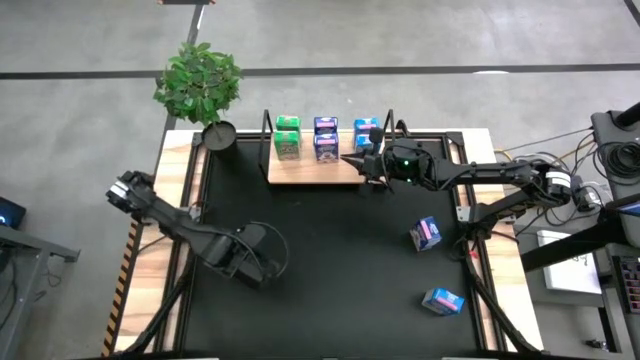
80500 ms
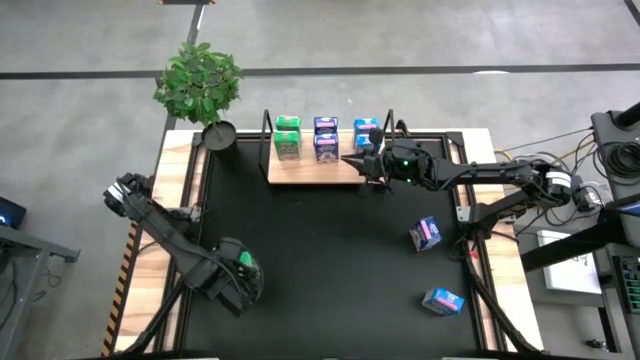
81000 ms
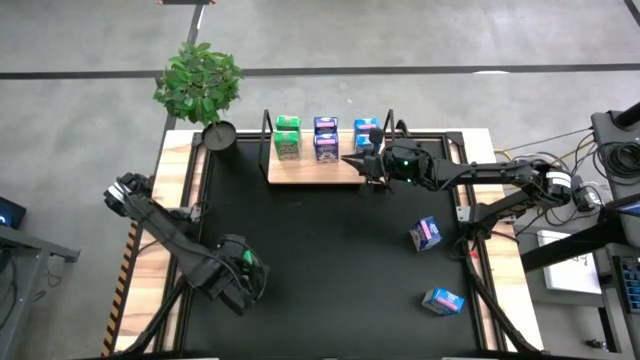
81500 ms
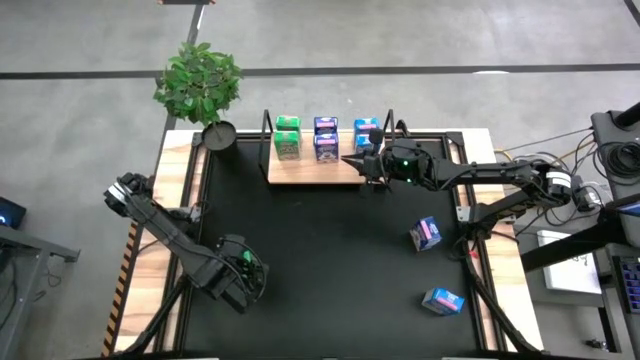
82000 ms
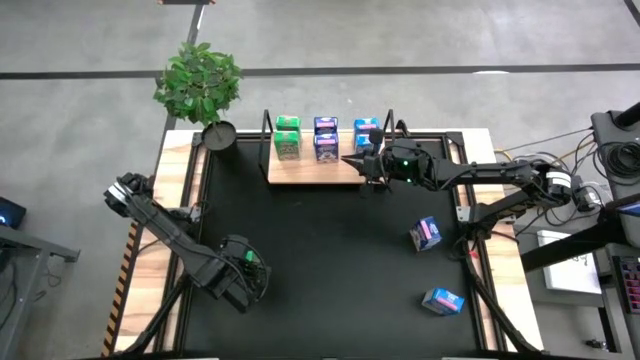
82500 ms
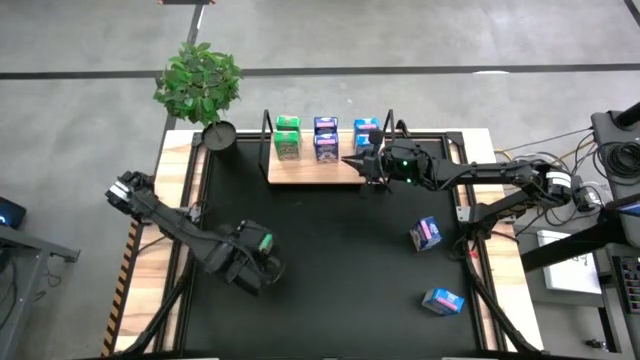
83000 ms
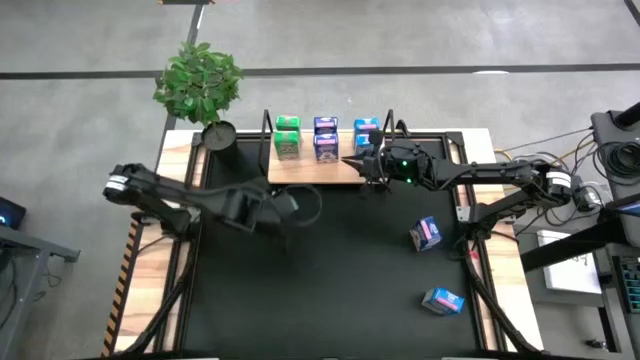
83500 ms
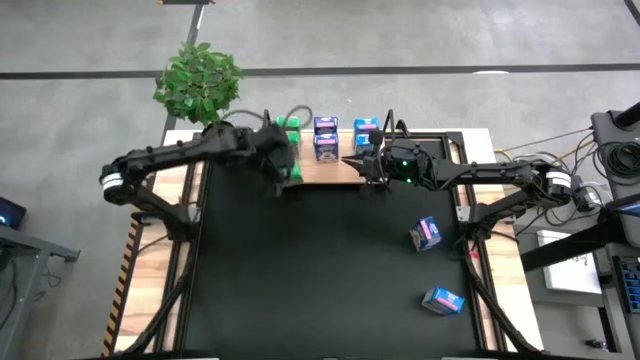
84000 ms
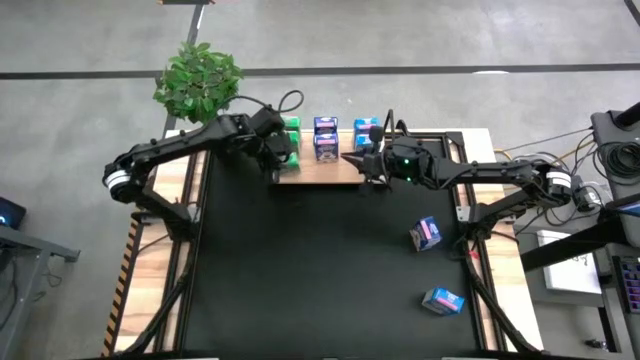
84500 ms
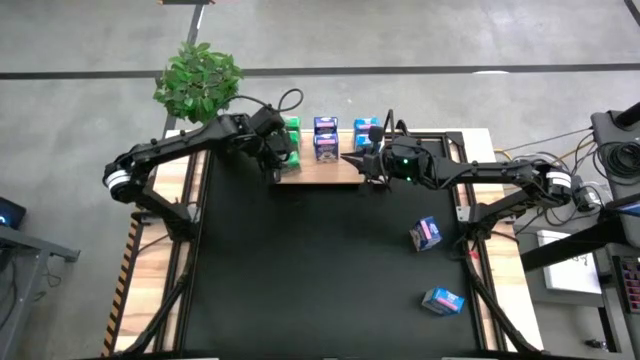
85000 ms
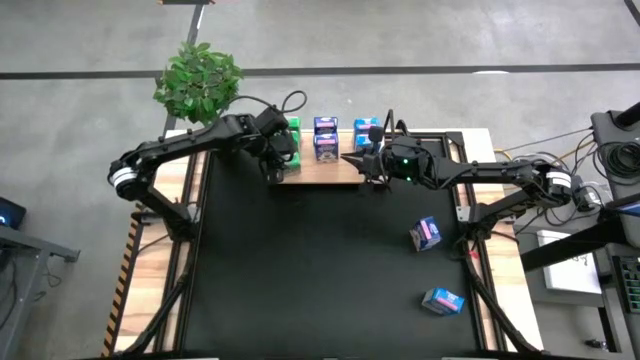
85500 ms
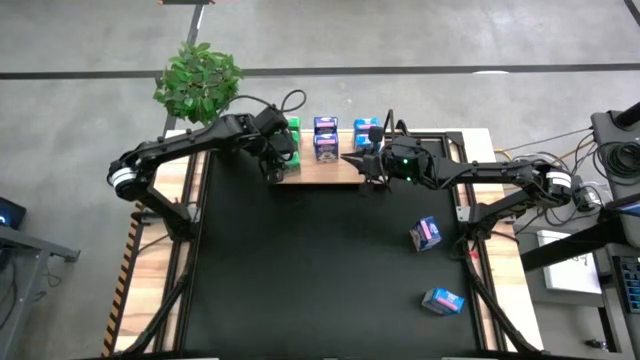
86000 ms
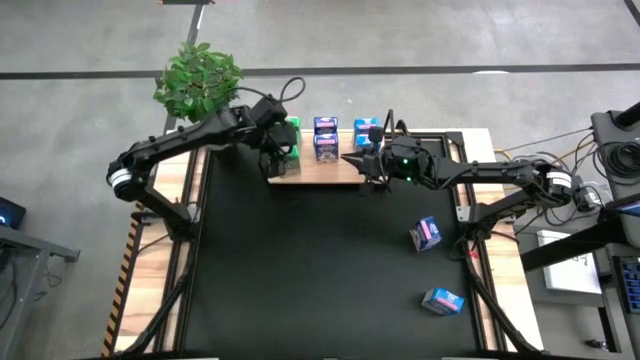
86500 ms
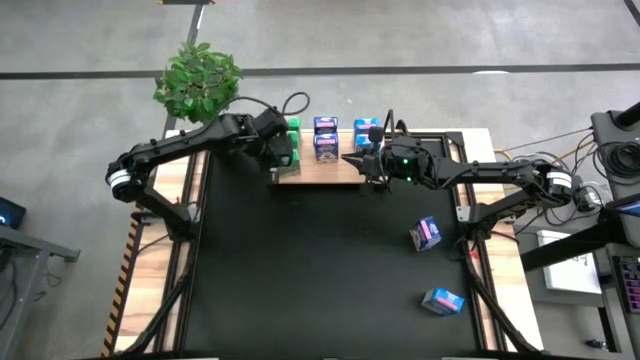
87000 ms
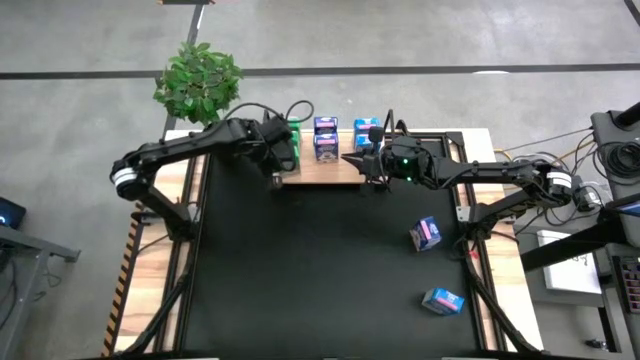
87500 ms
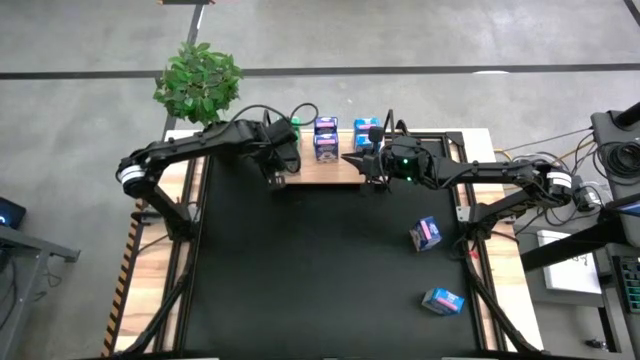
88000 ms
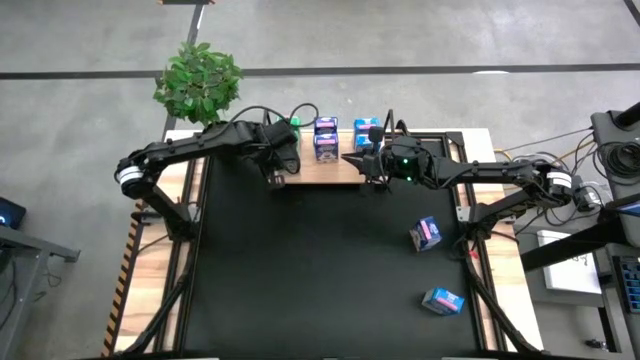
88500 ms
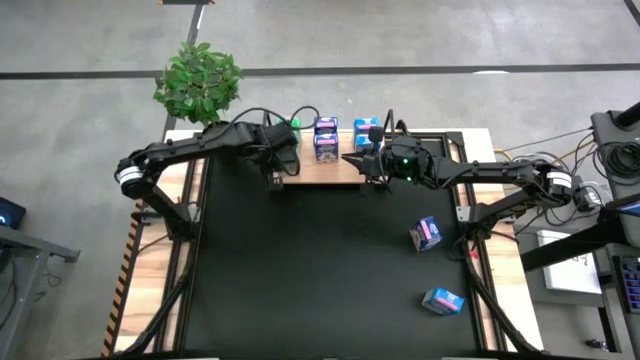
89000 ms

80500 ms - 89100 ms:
Task: Stack cereal on shelf
Put the green cereal box aligned with the other green cereal boxes on the shelf

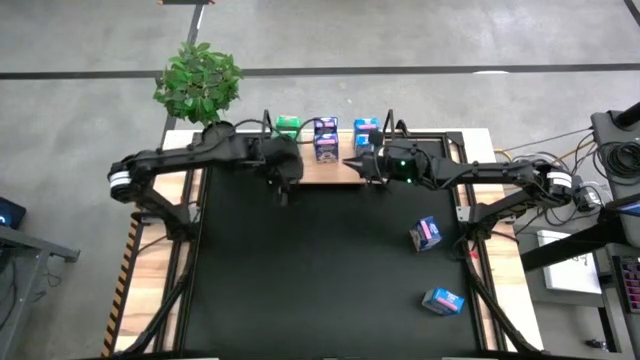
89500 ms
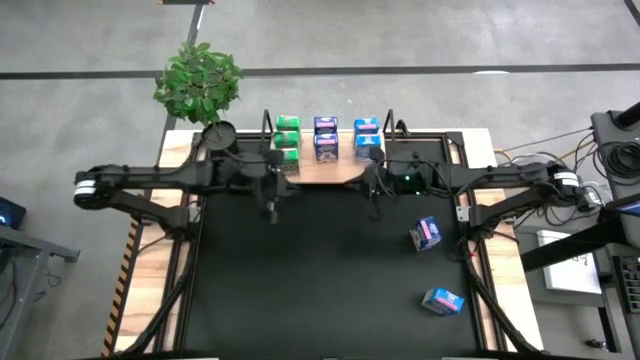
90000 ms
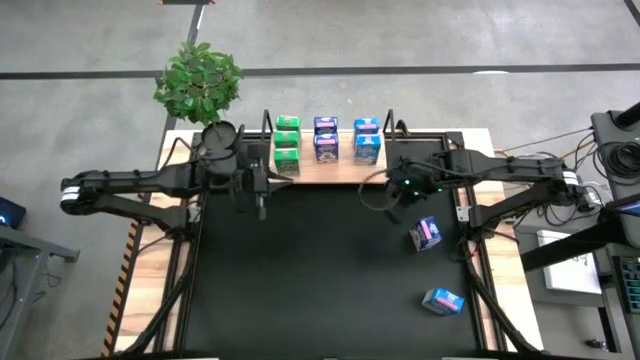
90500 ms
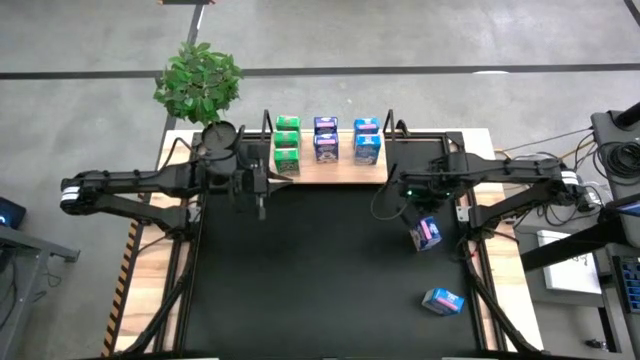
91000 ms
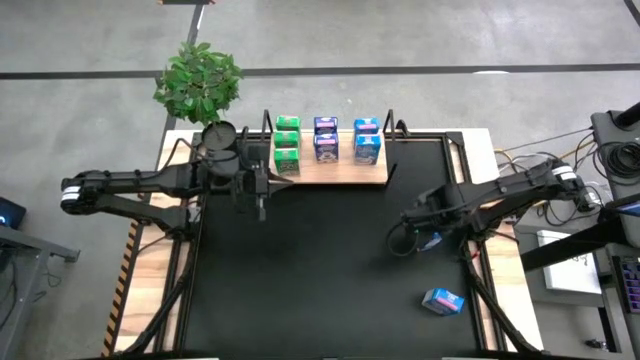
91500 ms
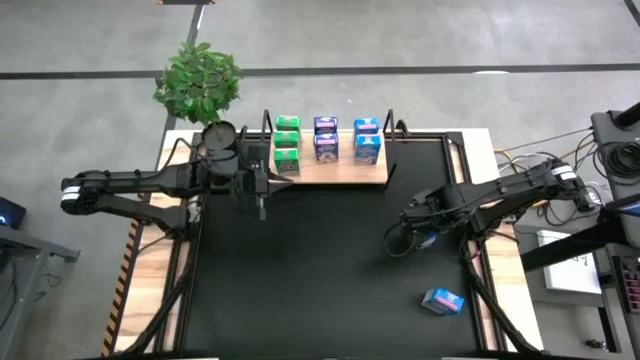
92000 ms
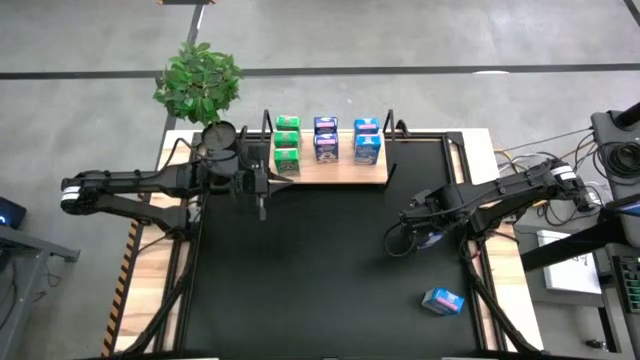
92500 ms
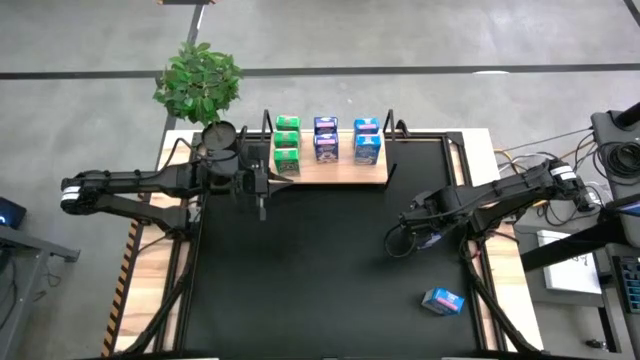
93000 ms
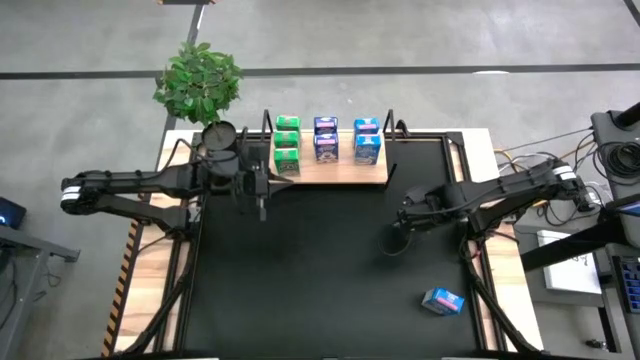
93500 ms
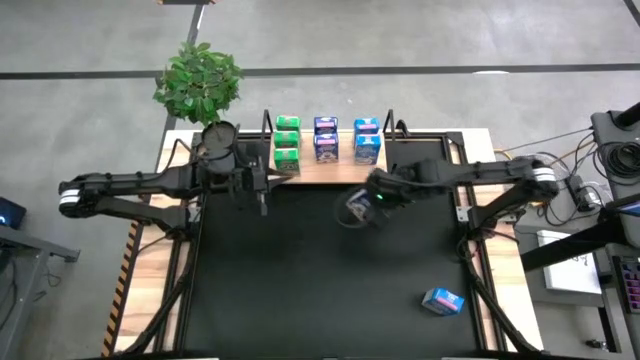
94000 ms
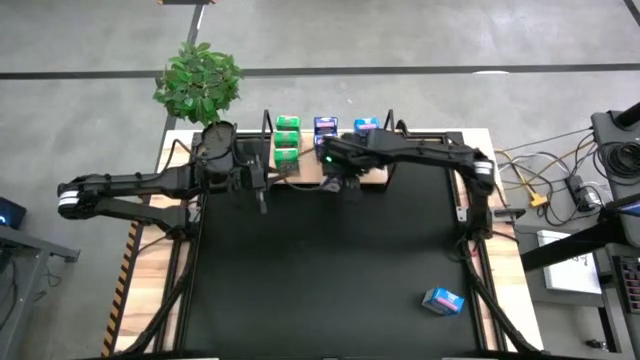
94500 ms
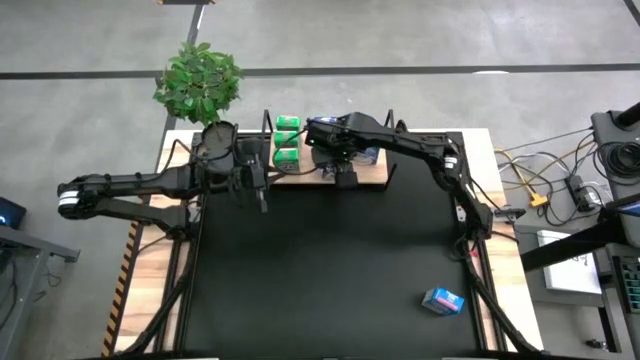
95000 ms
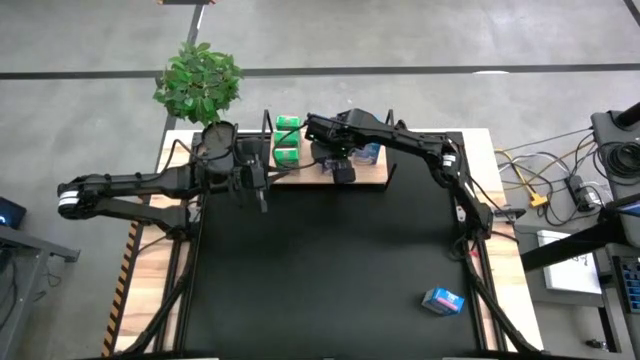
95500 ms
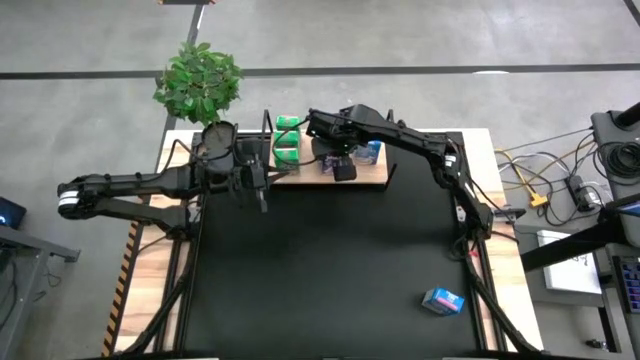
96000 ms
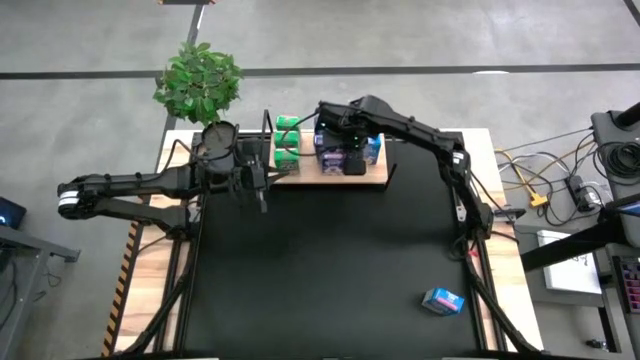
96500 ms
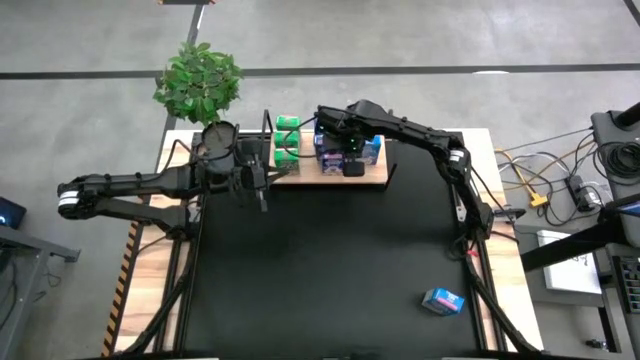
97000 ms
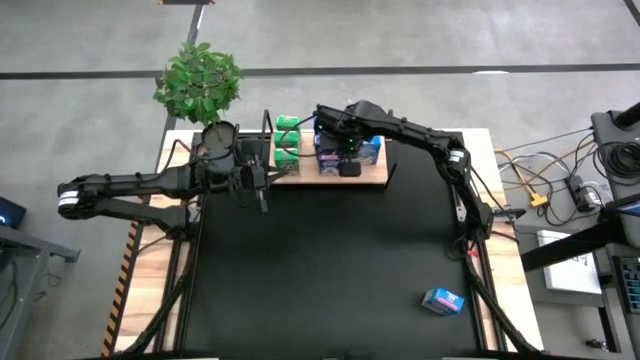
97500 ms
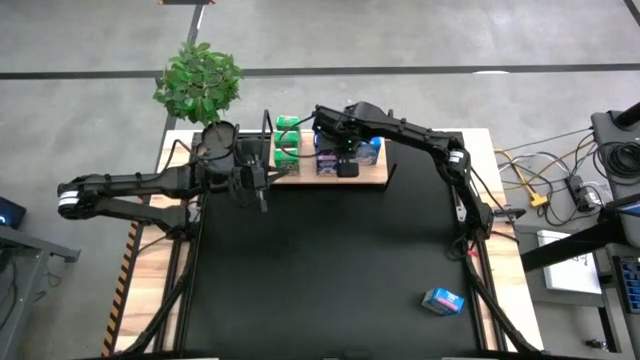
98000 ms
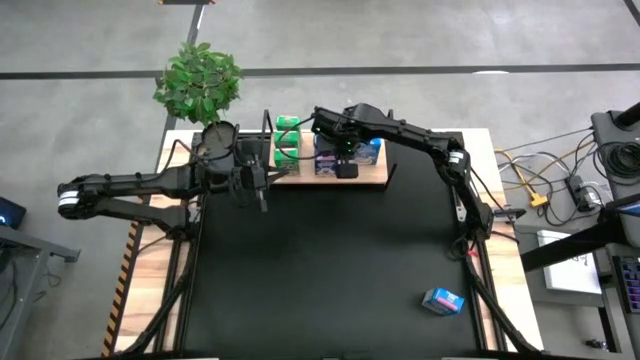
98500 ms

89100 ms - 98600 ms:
Put the blue cereal box aligned with the other blue cereal boxes on the shelf

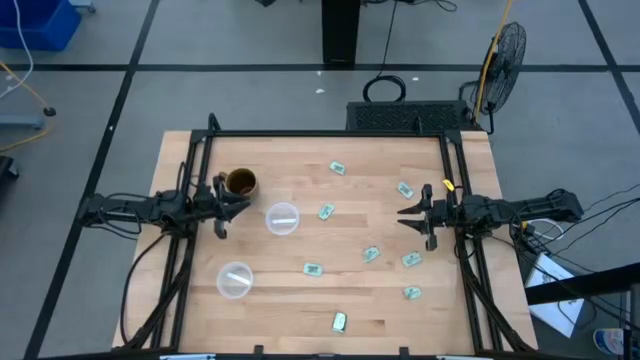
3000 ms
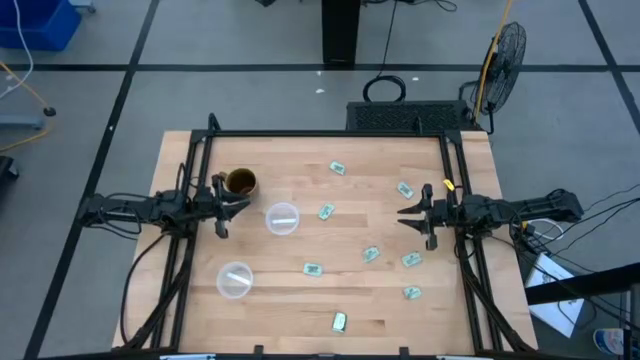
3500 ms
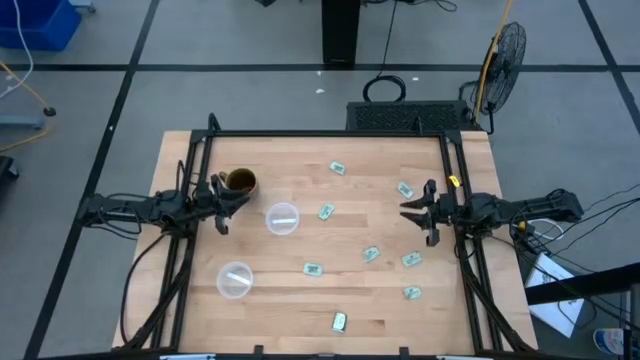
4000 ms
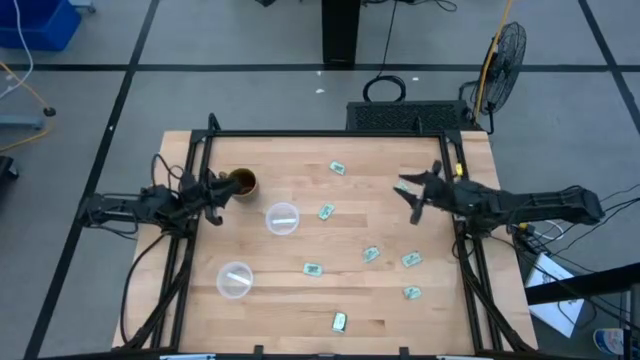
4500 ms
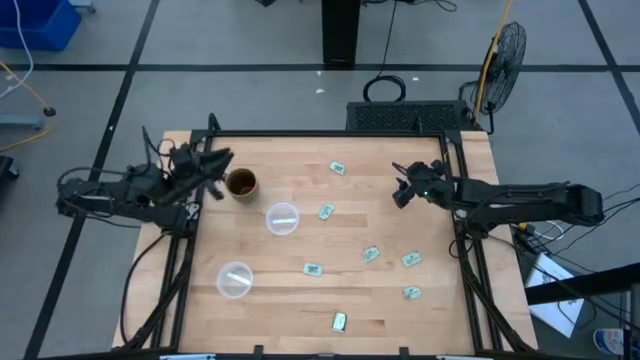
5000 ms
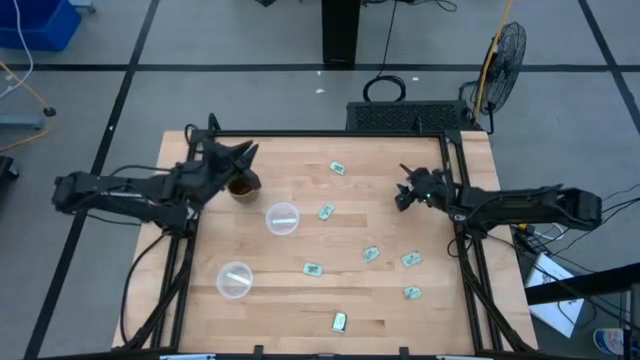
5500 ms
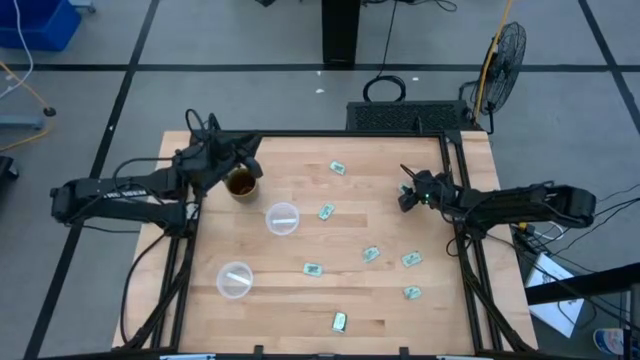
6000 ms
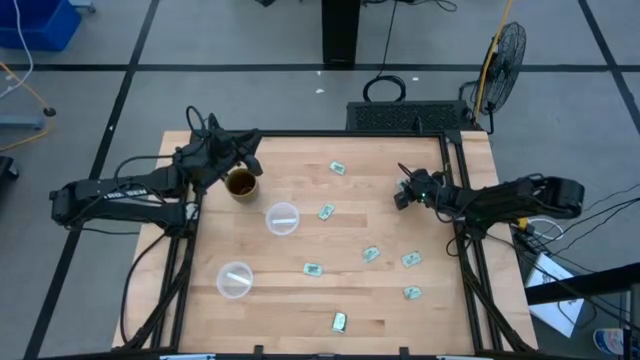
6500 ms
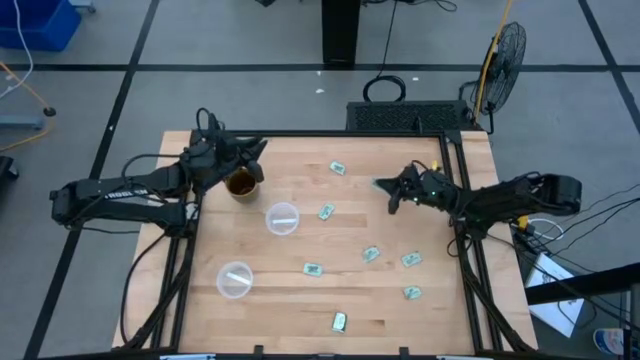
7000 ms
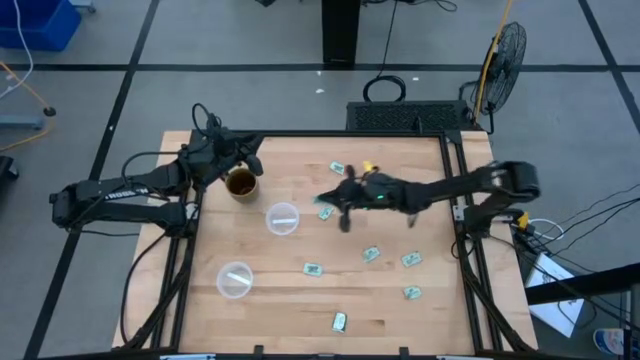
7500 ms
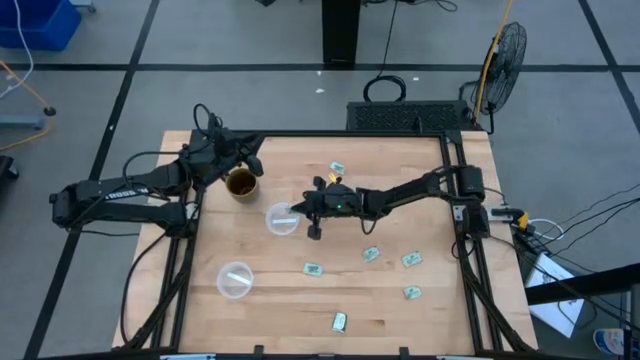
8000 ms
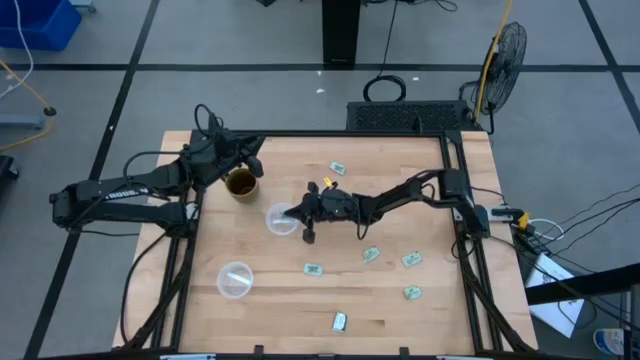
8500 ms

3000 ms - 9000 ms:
Task: Pick and place Stevia / Truvia into bins
Put the stevia packet into the top transparent container
